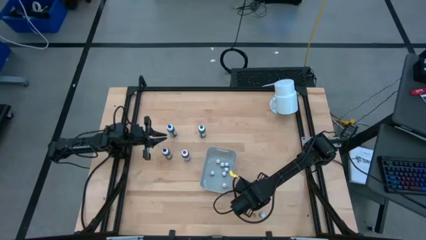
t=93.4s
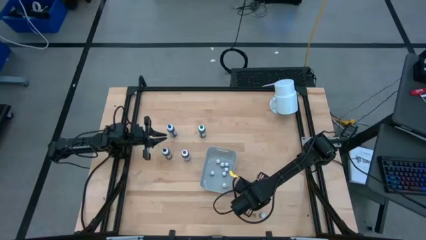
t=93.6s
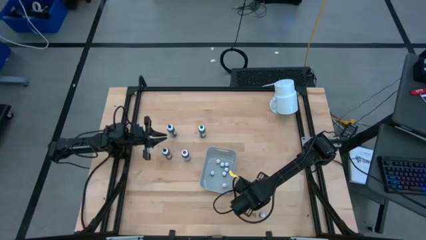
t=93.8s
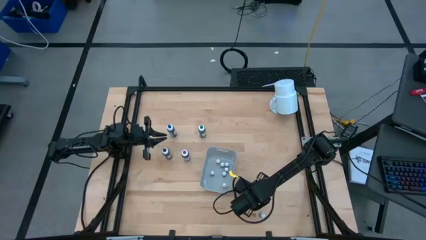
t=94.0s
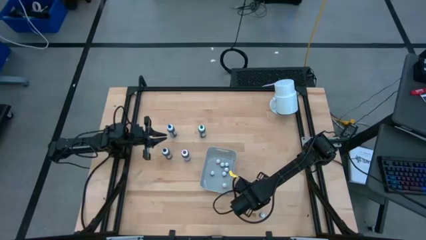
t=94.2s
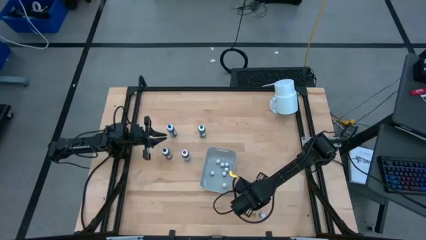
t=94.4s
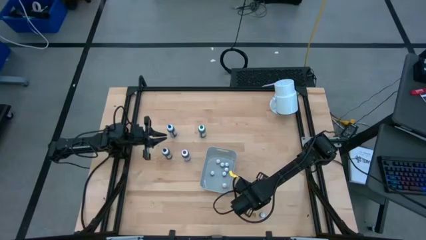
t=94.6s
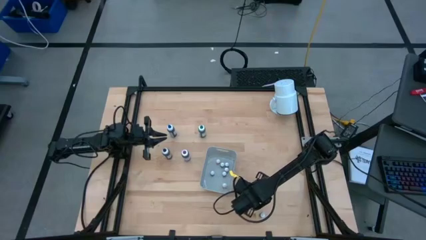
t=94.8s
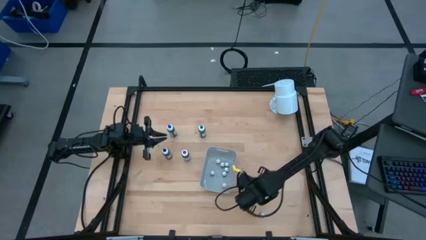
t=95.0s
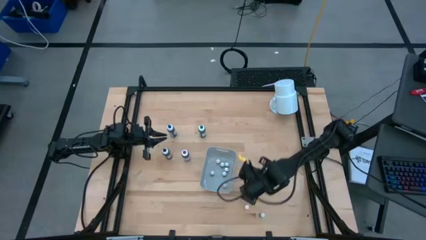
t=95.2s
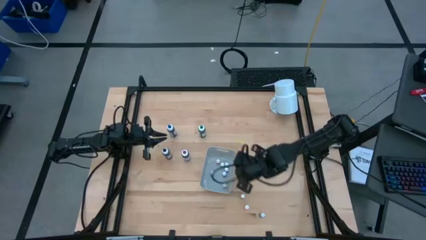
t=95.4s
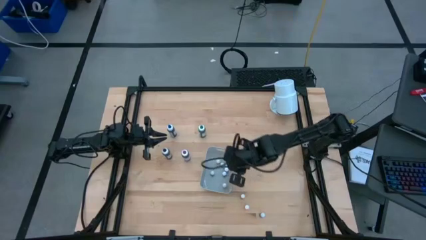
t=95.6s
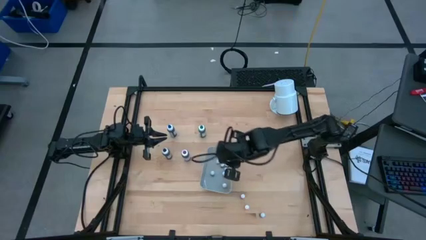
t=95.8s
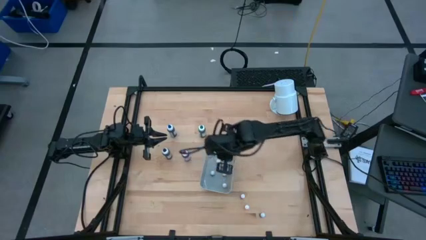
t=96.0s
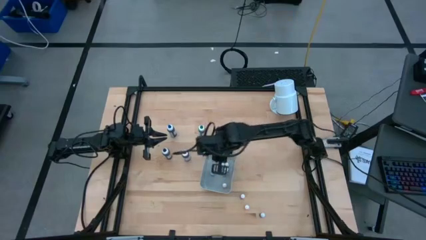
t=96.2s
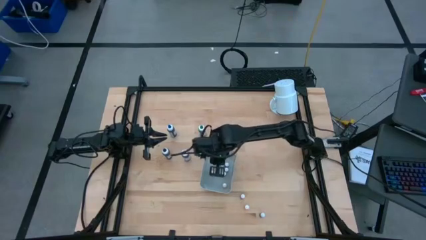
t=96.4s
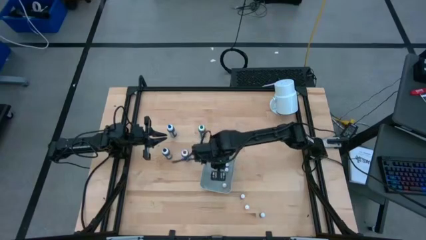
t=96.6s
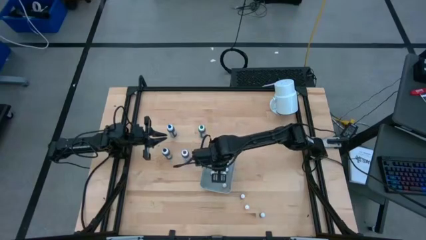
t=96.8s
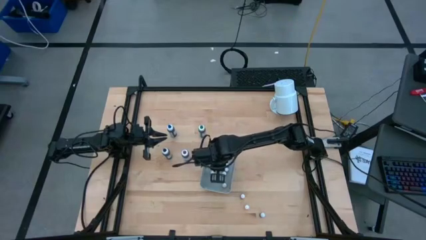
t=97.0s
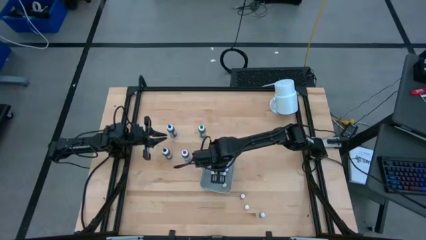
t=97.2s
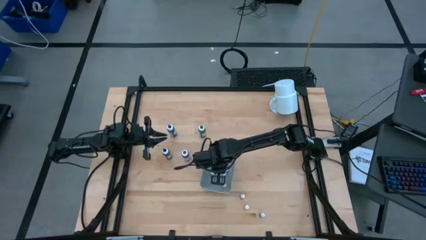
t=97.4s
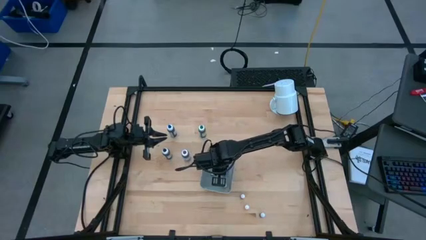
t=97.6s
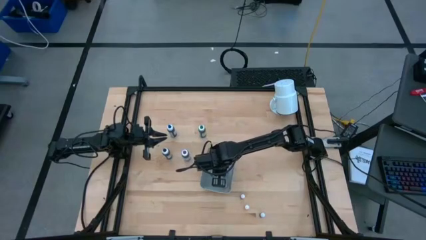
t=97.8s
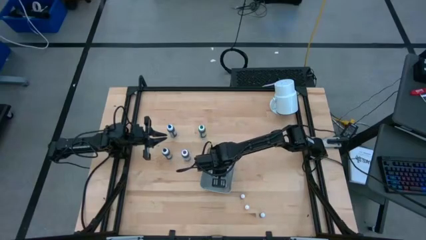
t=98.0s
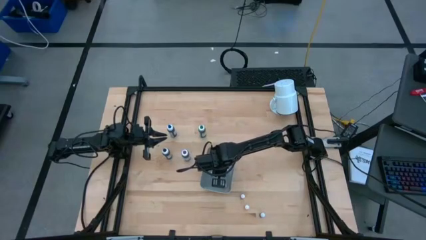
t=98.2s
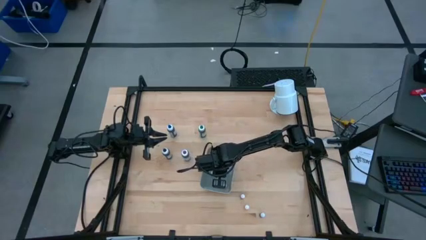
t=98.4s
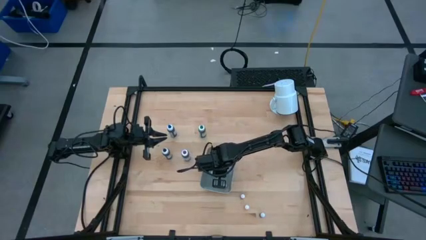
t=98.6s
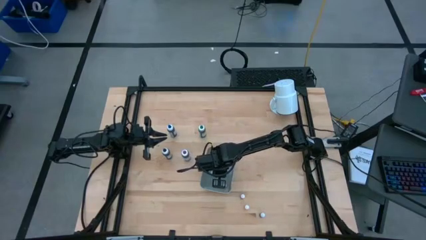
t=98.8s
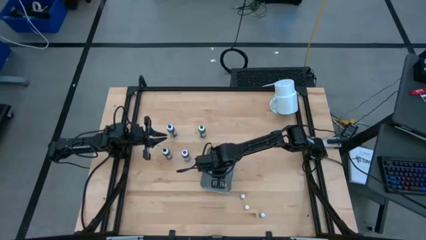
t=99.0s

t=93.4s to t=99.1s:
Task: Pick & Place food coloring
Put the small yellow food coloring bottle into the white bin

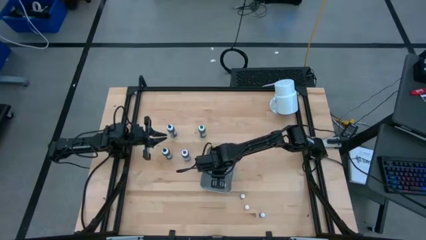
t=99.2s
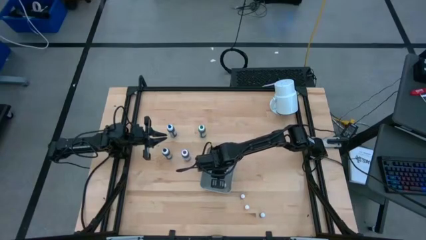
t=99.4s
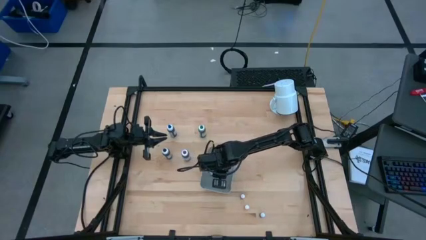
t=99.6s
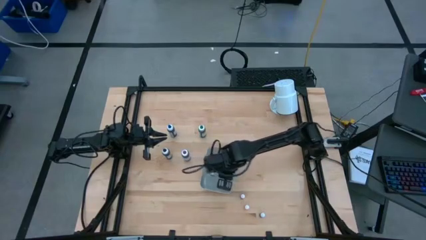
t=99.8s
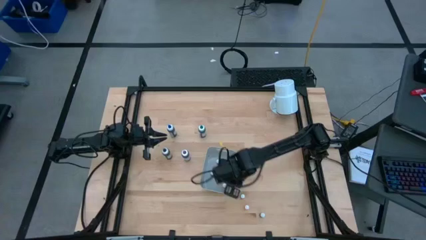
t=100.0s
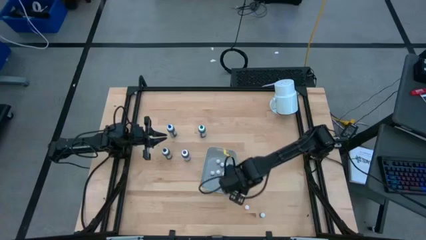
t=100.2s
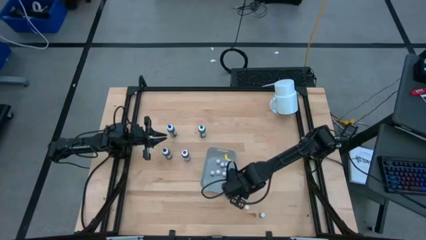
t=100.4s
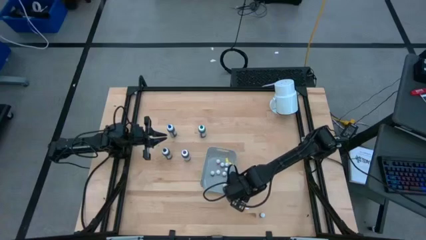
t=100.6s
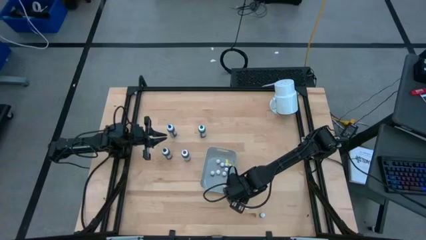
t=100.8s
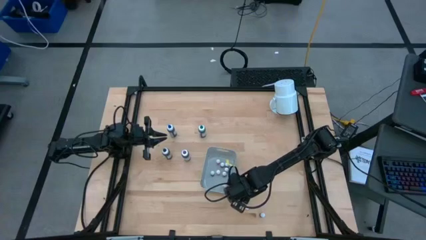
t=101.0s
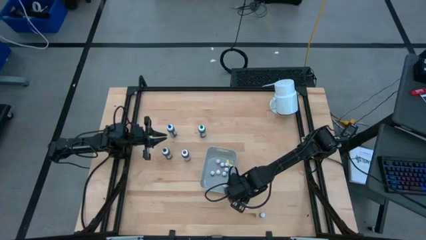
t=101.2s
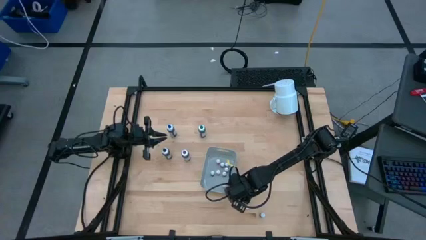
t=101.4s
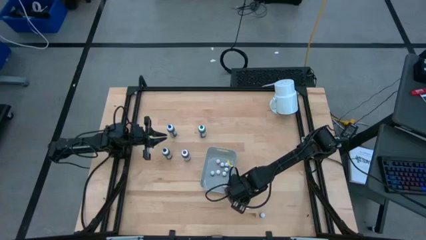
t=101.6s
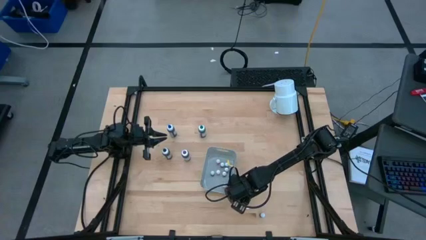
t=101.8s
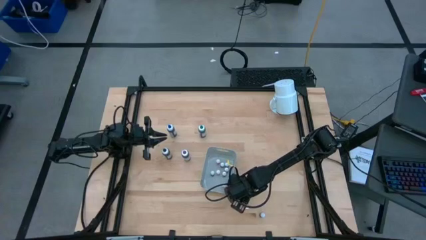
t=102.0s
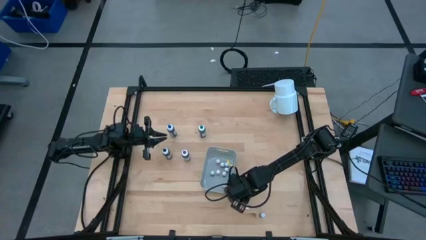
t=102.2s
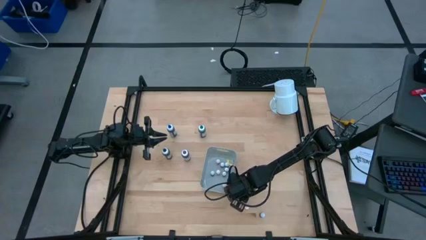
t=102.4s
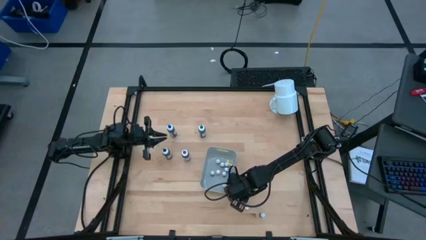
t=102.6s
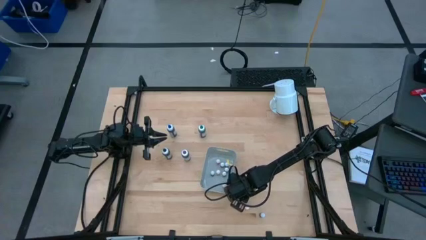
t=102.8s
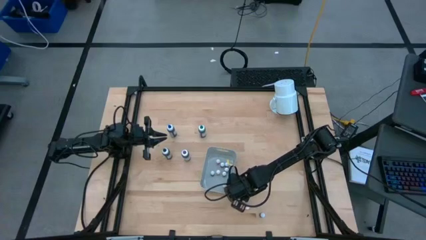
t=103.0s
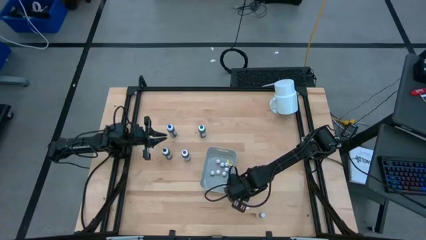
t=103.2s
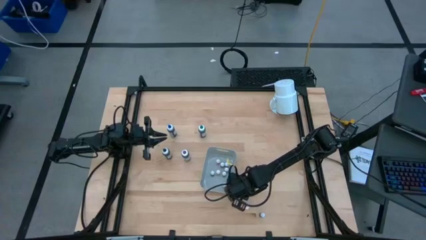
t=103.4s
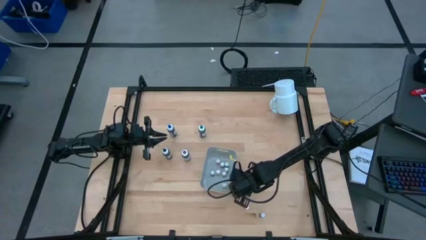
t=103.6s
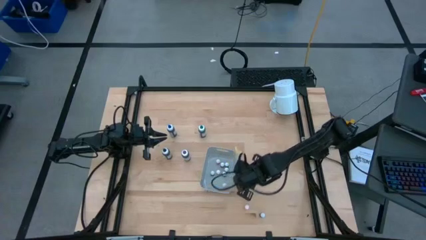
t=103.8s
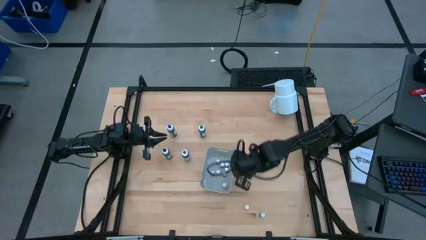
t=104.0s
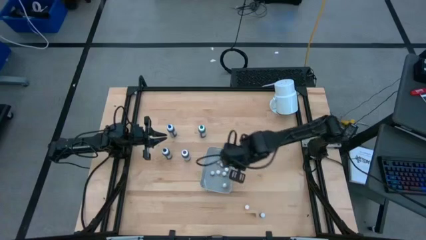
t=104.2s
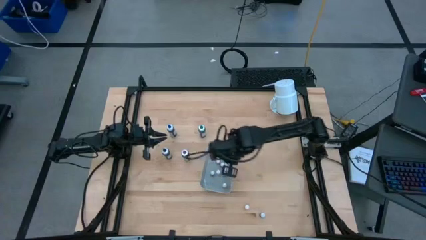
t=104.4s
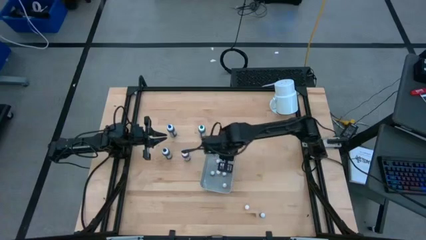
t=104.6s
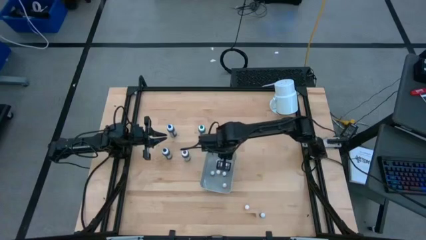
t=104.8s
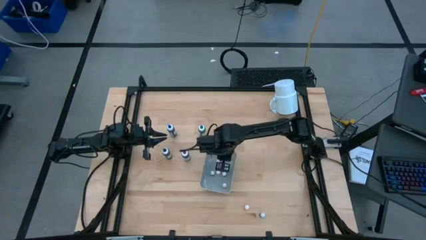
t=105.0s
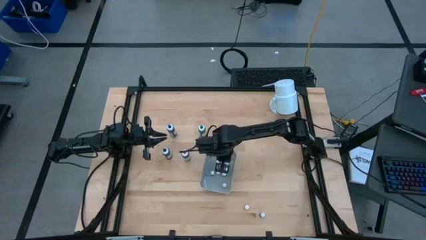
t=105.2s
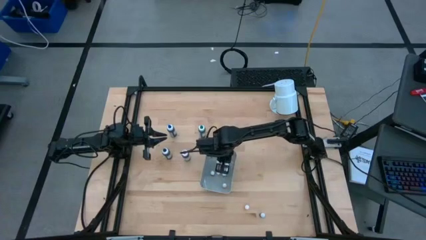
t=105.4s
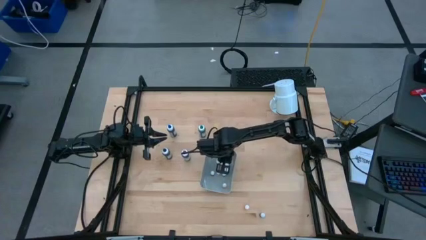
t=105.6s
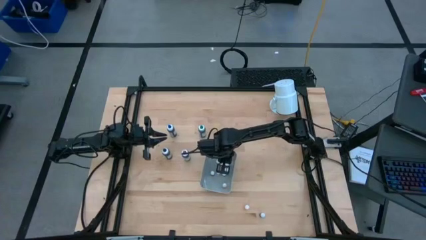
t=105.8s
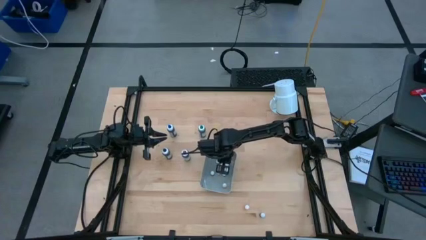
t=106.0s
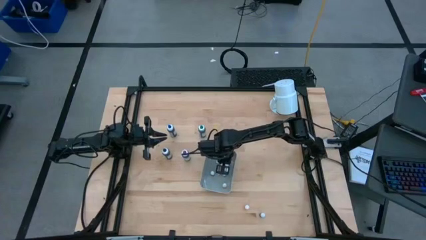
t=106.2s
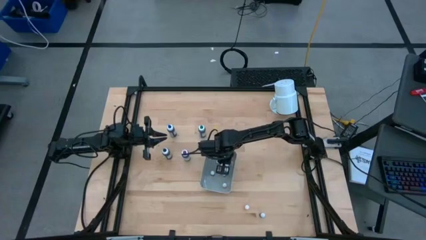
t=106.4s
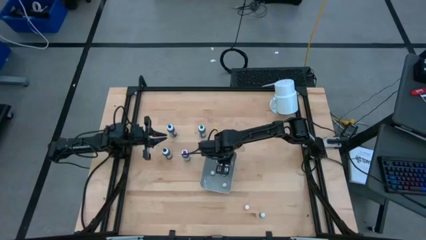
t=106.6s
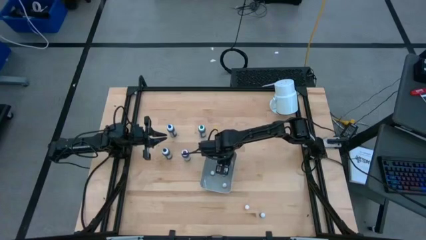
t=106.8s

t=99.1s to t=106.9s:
Put the small red food coloring bottle into the white bin

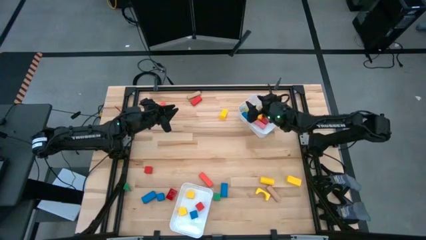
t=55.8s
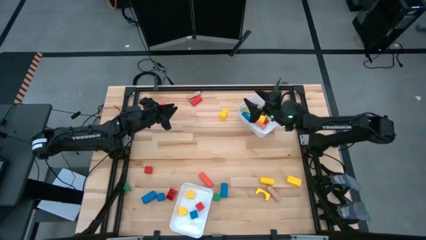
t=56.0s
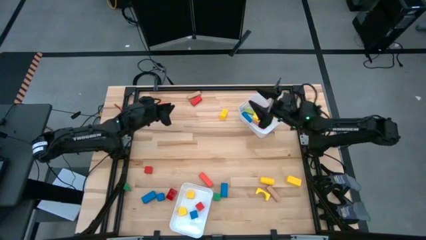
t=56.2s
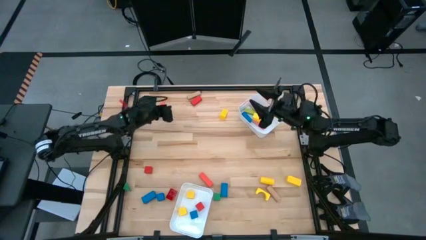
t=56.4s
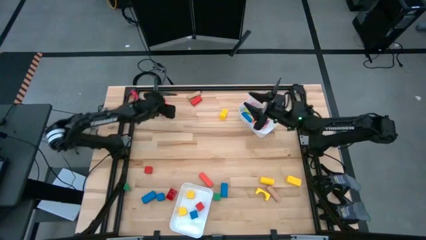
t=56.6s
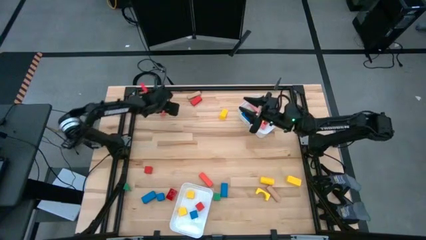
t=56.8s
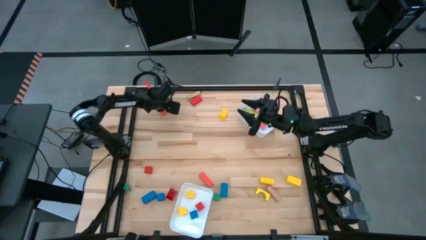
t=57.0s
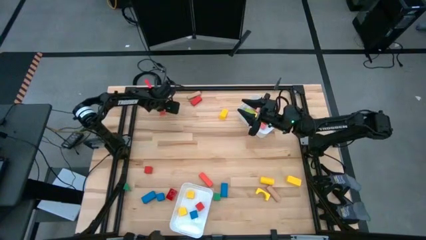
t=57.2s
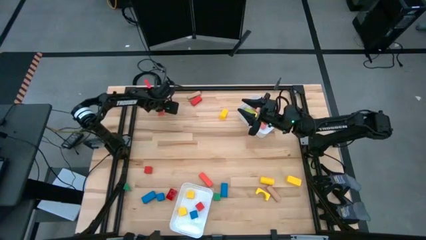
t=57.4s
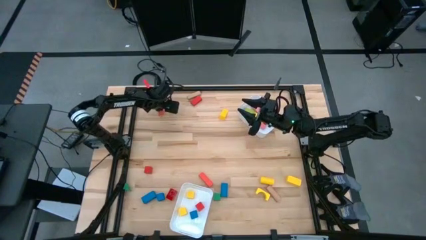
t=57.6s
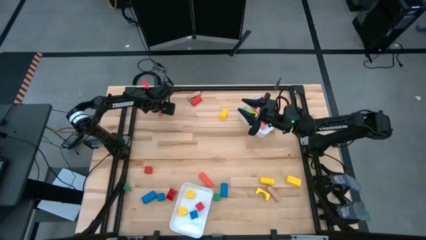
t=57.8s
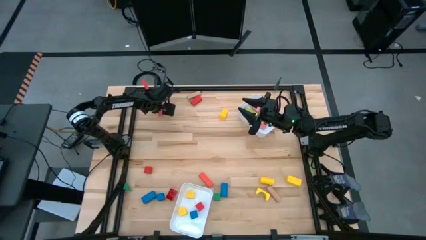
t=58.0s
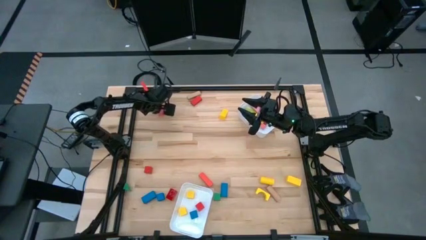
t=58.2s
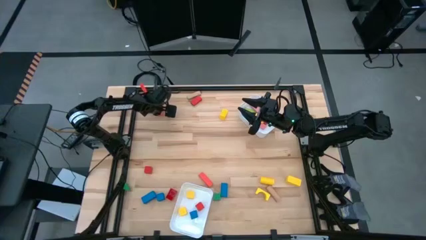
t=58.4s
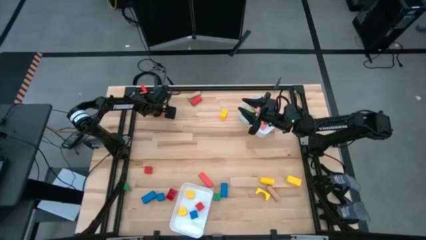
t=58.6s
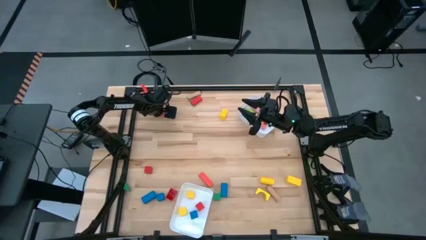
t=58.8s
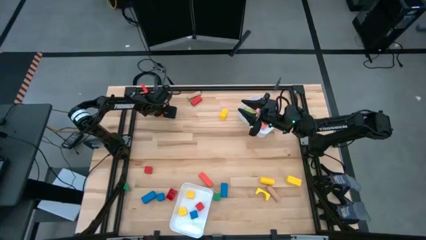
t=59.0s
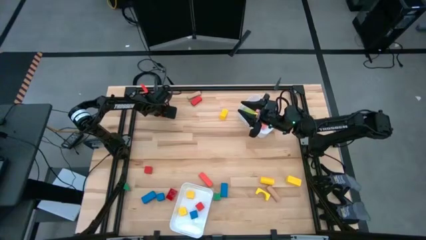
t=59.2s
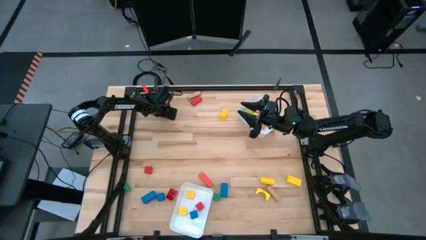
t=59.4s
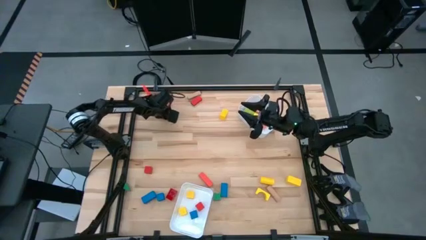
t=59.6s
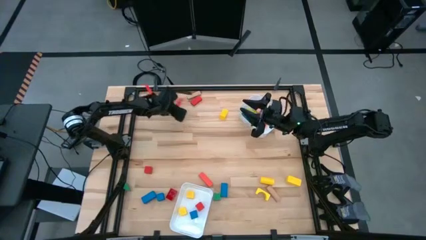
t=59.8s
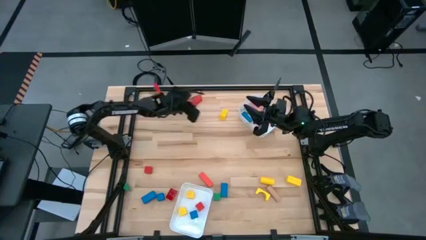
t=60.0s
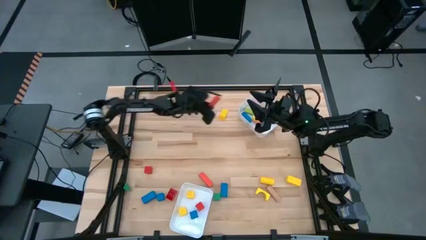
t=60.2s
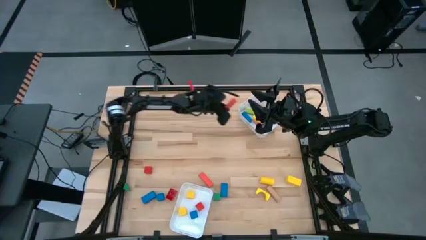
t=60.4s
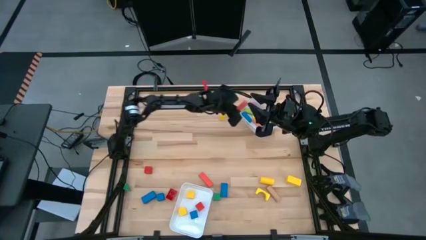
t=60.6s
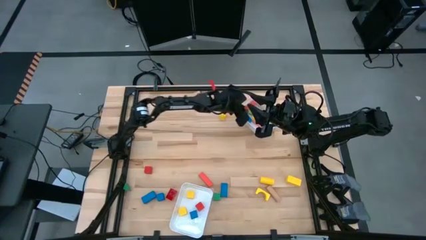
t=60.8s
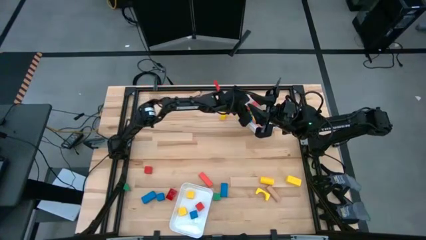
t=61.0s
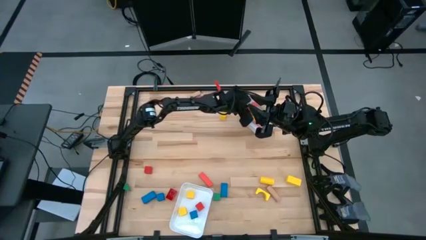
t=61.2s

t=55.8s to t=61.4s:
Task: Sort blocks by size
Put the red rectangle block into the top white bin
